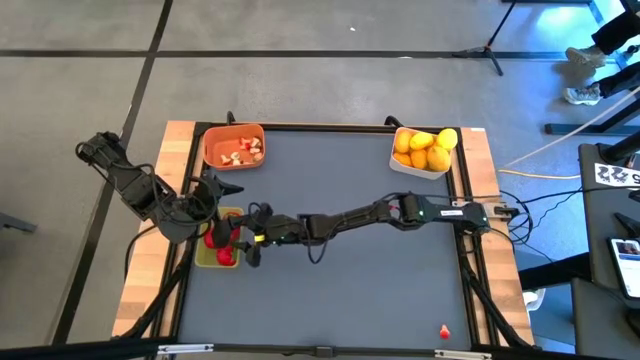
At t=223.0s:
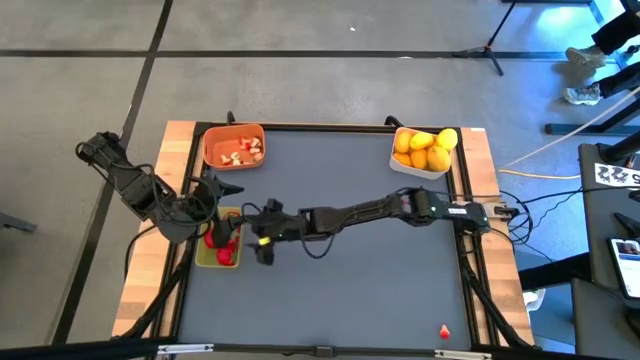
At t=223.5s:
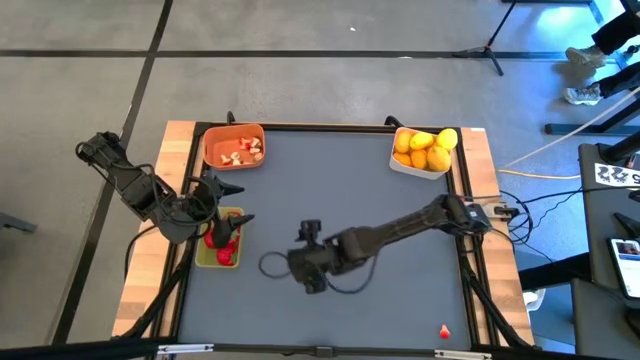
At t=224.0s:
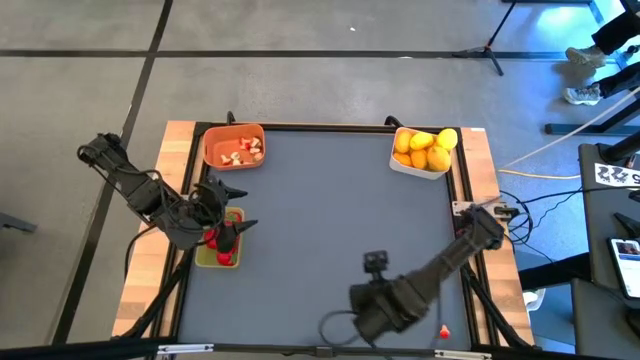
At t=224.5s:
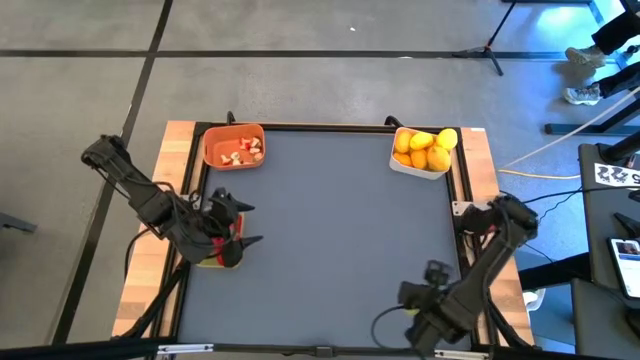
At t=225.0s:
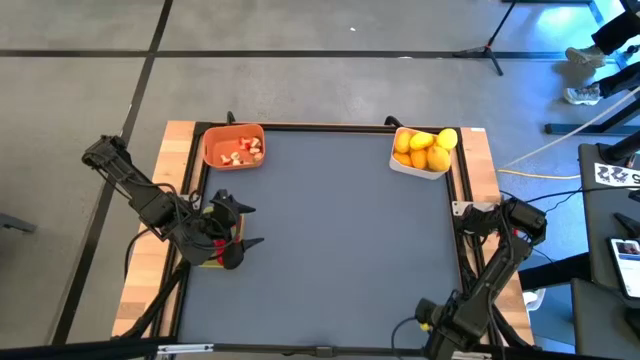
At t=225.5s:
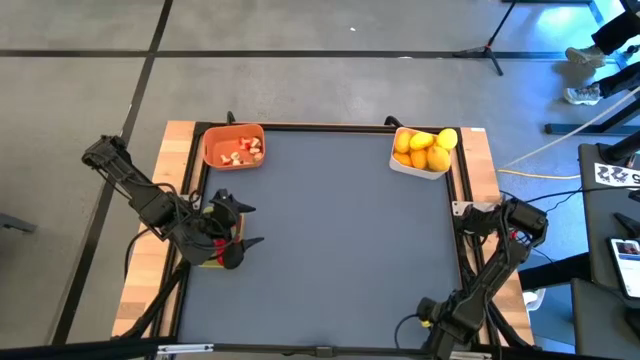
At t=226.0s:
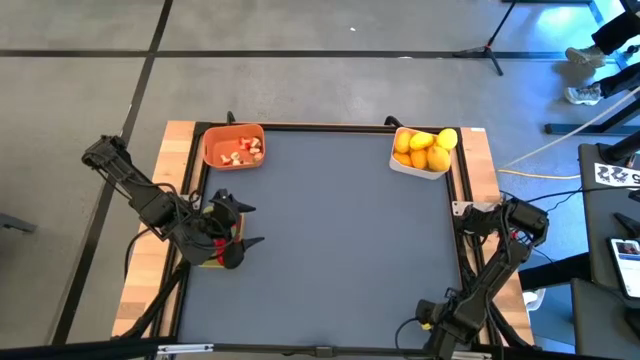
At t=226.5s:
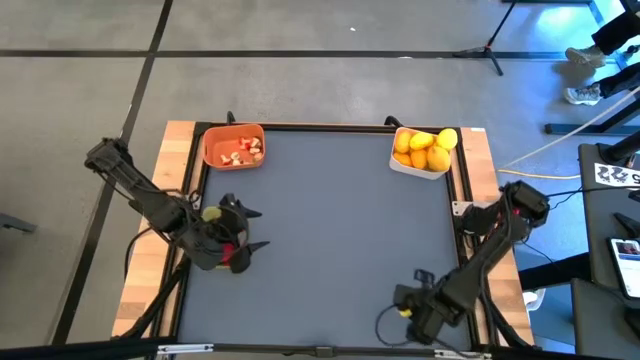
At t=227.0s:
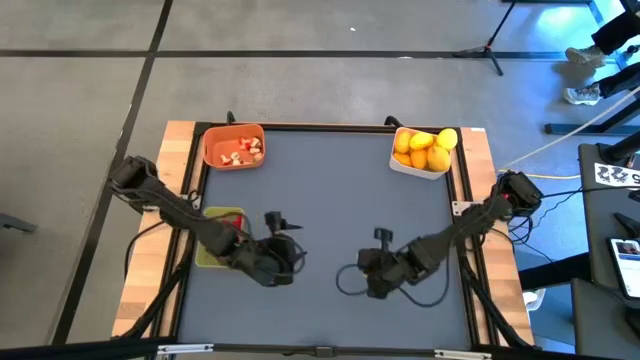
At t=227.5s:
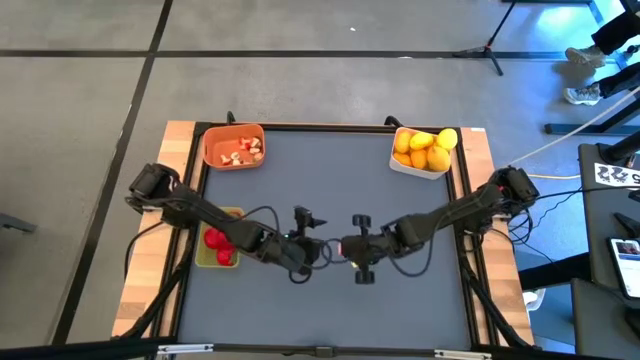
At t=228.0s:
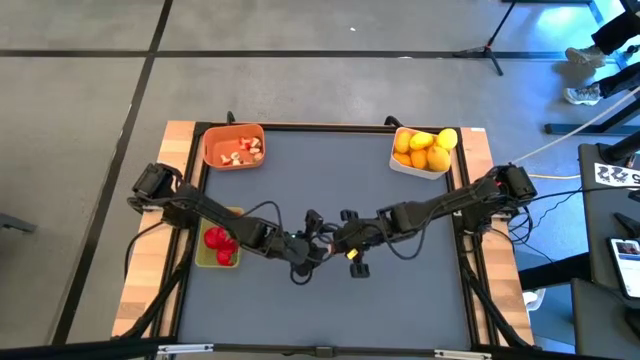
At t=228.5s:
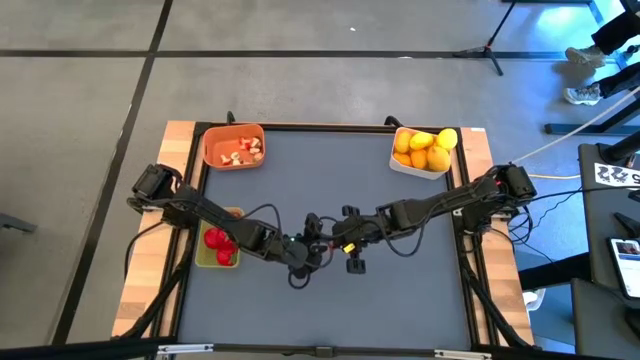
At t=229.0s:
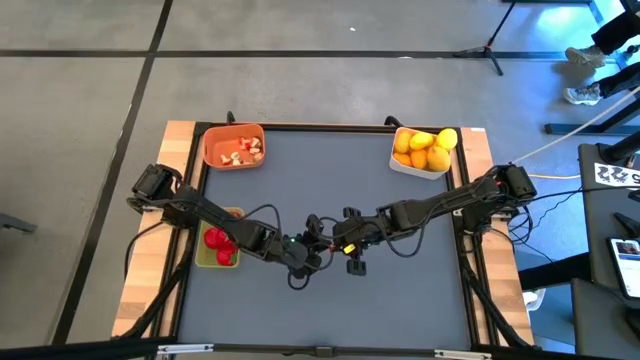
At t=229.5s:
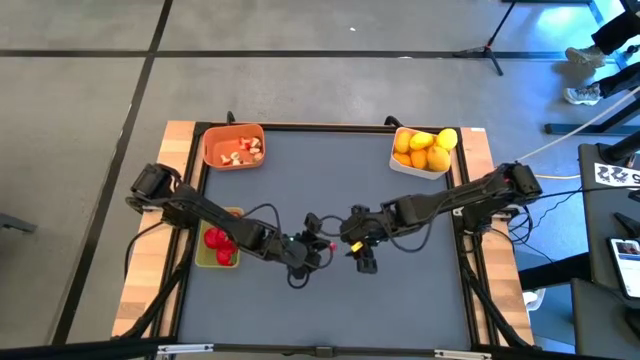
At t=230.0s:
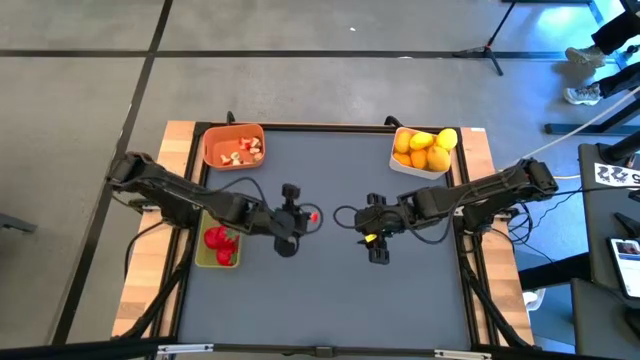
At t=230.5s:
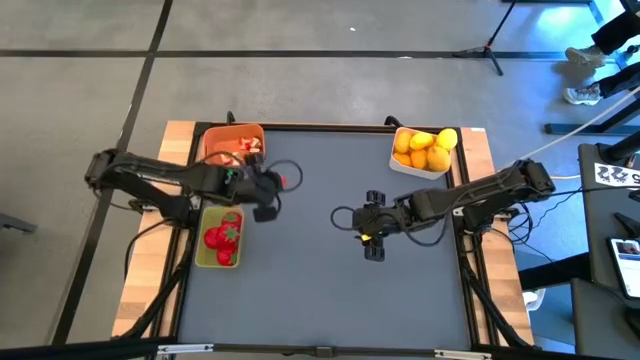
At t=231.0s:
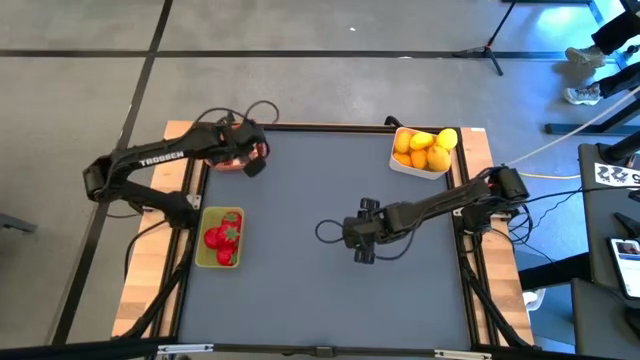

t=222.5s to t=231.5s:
Task: Sort produce into baskets
Put the red mushroom into the orange bin

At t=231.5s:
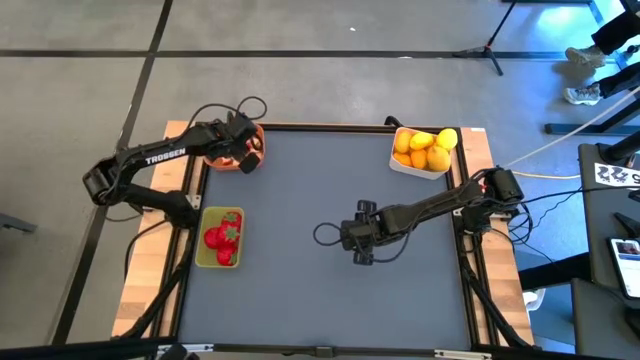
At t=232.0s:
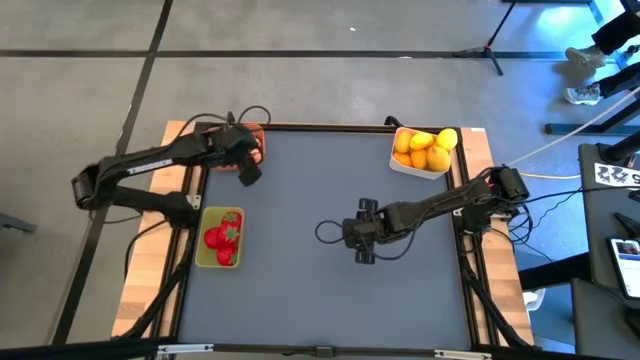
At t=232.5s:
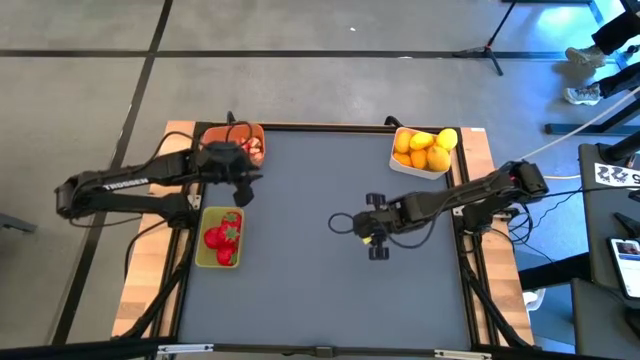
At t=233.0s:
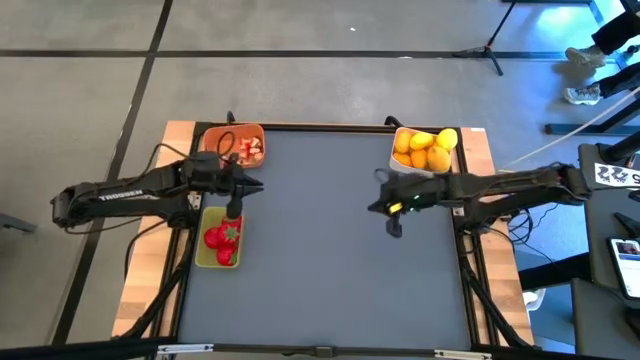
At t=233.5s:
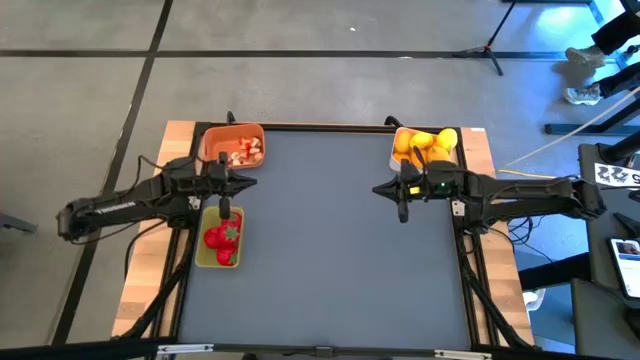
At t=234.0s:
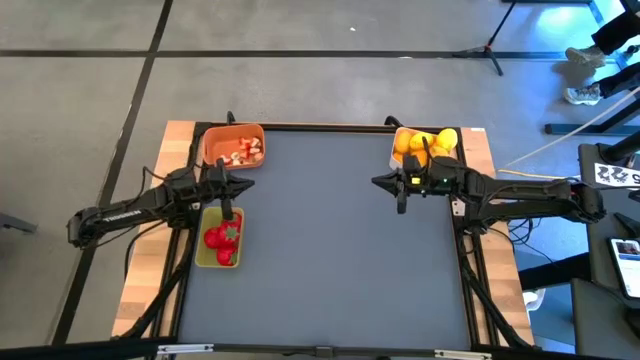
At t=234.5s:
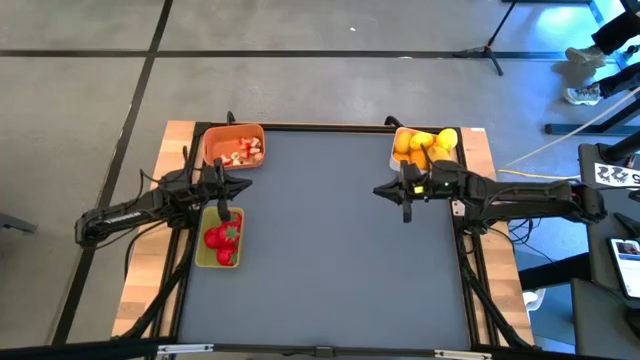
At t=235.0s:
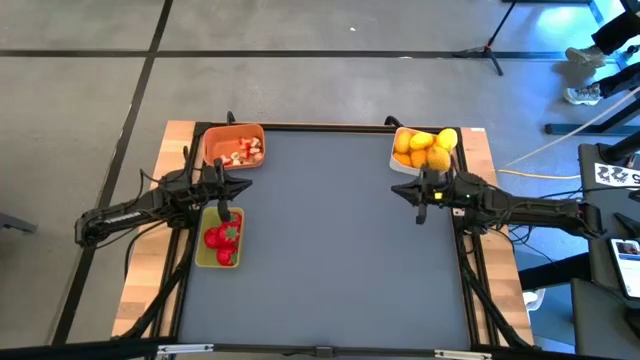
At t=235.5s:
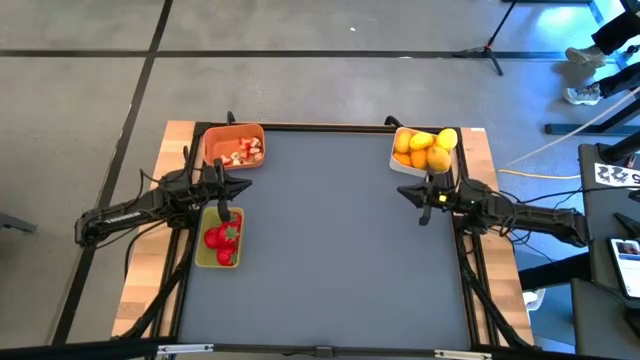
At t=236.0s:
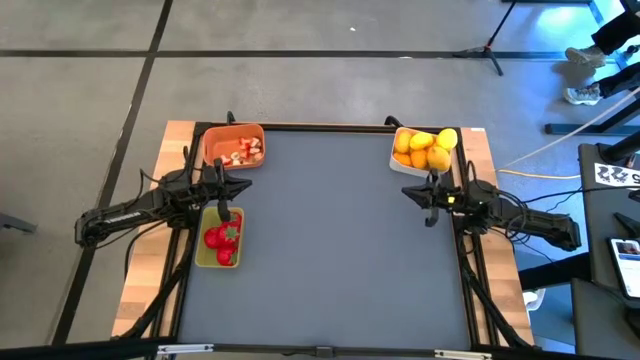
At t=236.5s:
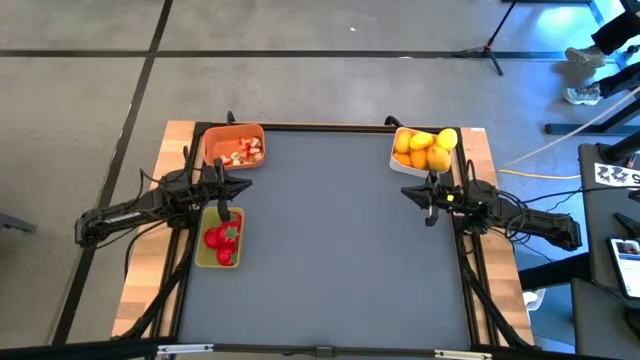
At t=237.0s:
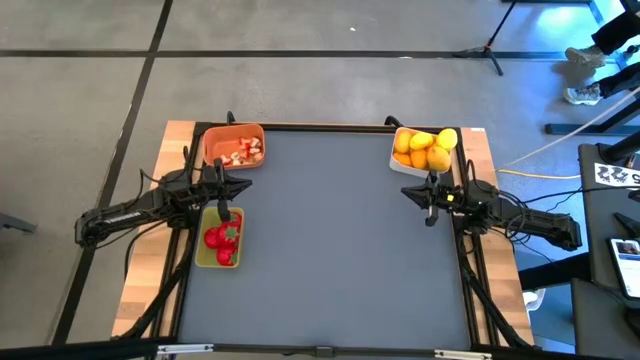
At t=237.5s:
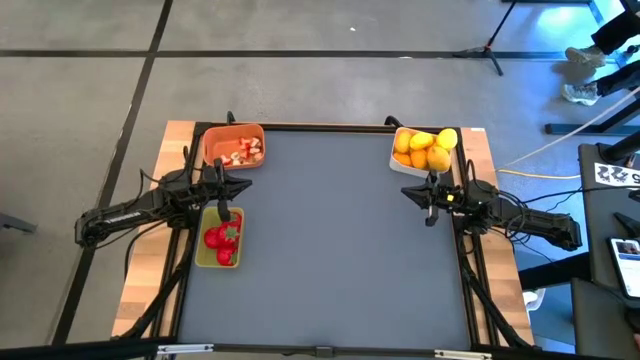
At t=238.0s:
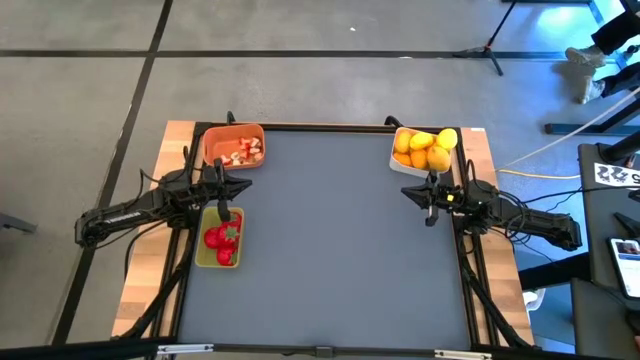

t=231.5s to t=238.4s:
Return to Home Position

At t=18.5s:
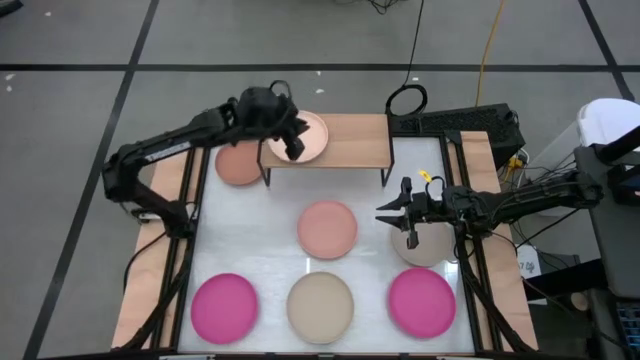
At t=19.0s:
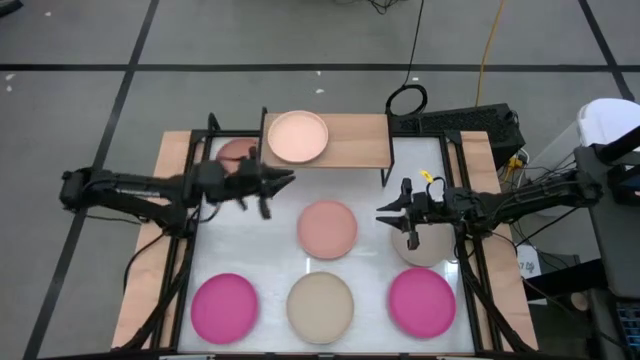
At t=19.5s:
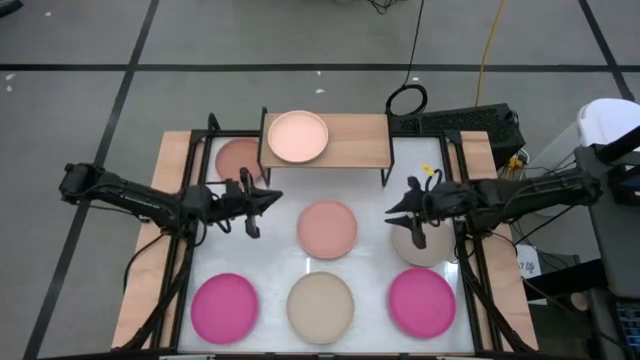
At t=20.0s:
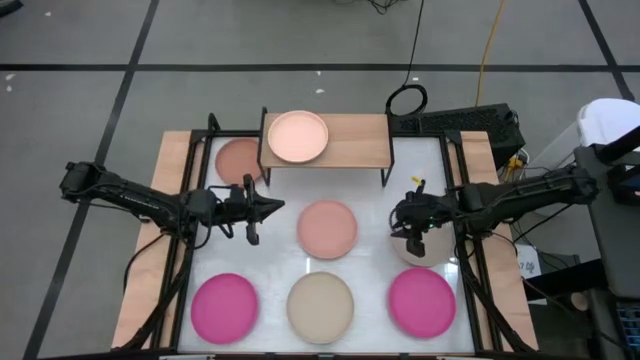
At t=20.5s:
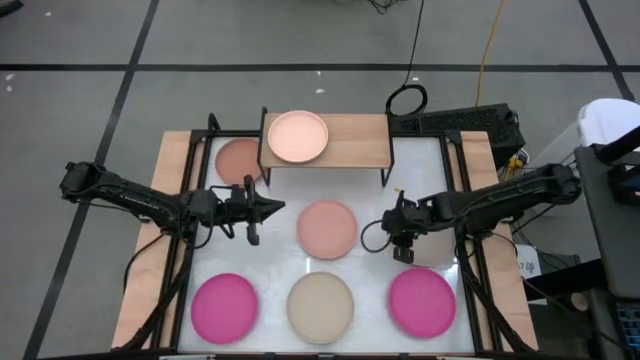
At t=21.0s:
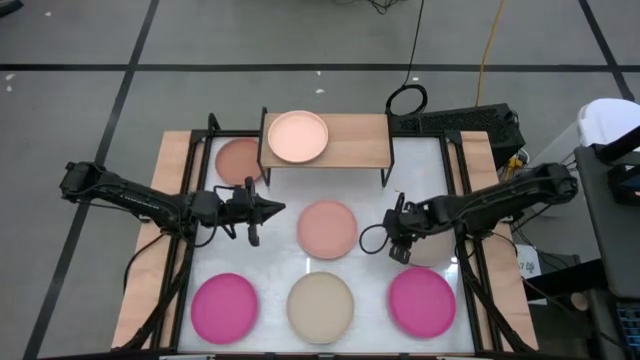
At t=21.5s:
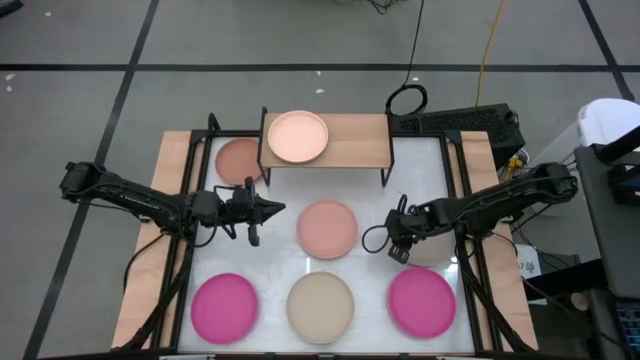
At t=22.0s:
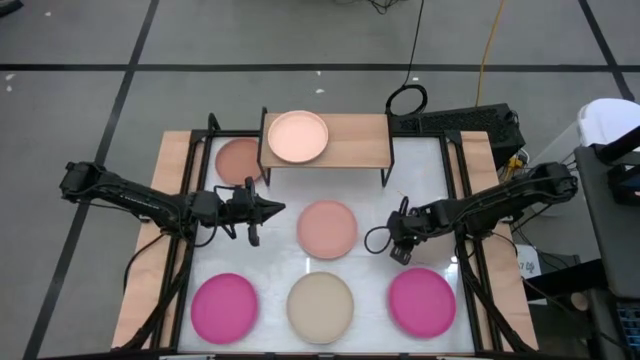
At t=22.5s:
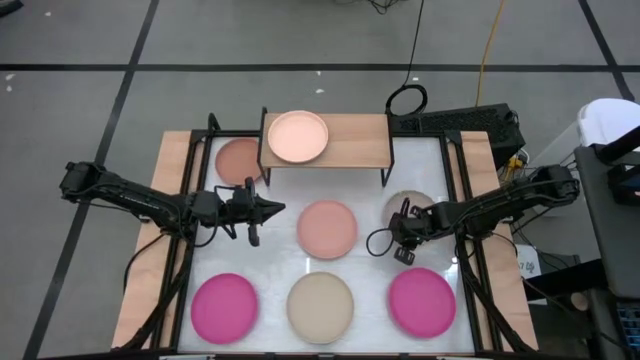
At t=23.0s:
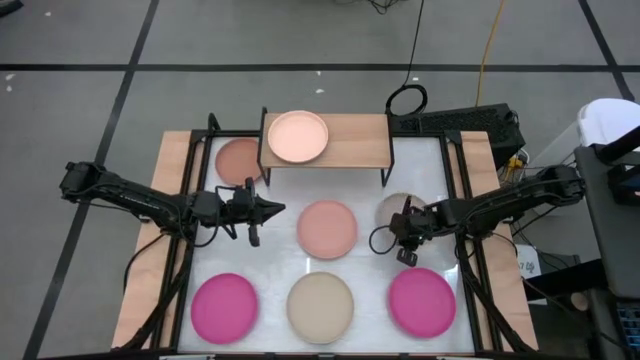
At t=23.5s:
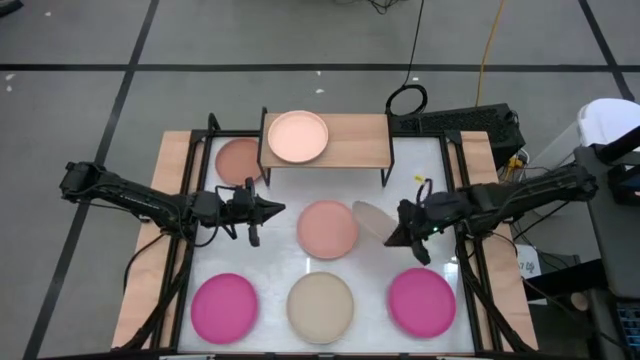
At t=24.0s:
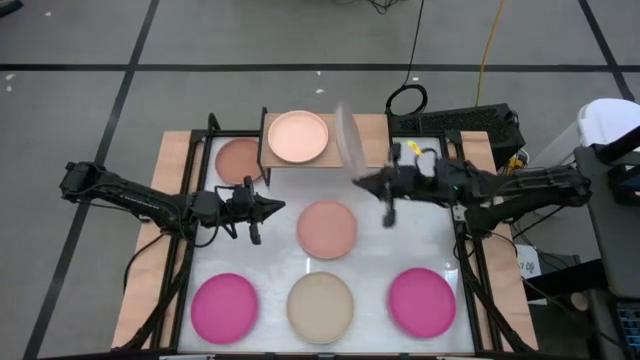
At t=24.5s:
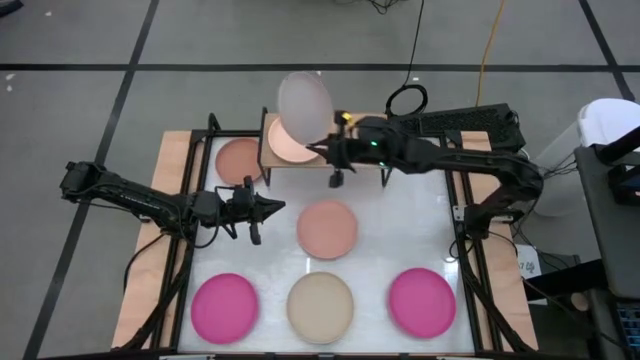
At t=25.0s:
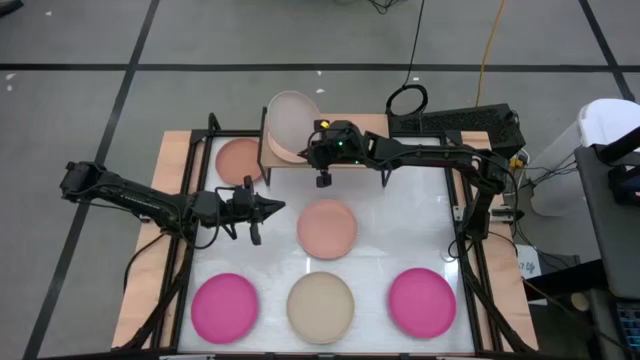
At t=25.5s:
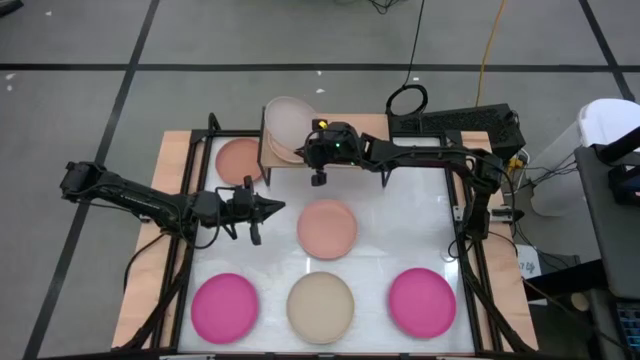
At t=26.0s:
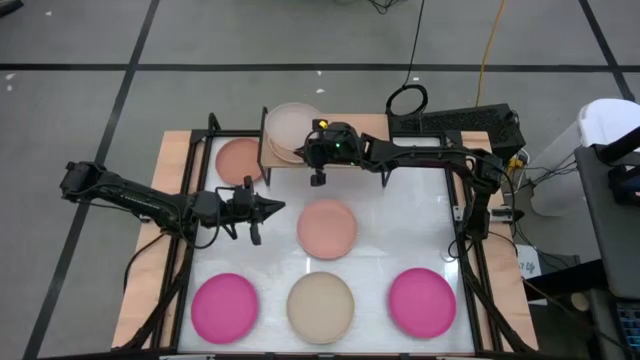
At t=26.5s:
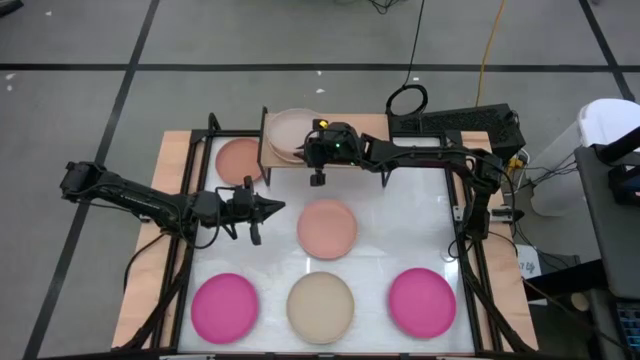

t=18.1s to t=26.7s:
Task: Place and stack plates onto a shelf
Stack the right brown plate on top of the light orange plate on the shelf
